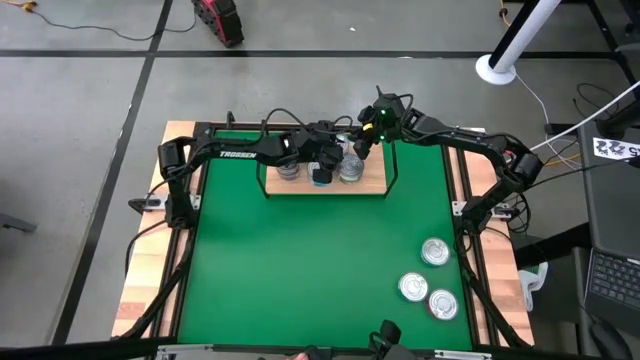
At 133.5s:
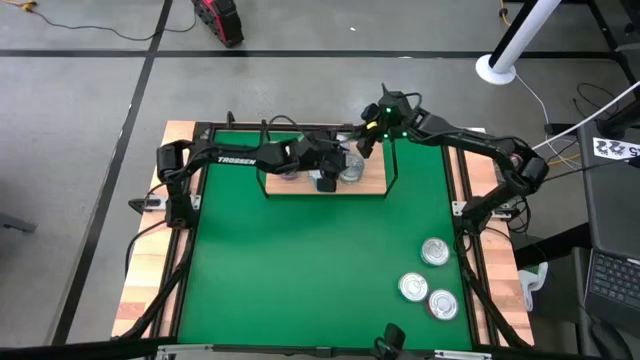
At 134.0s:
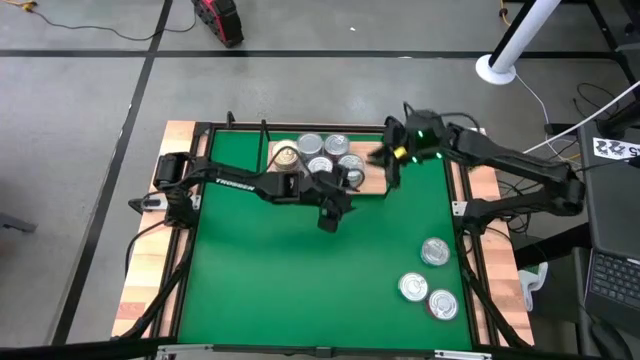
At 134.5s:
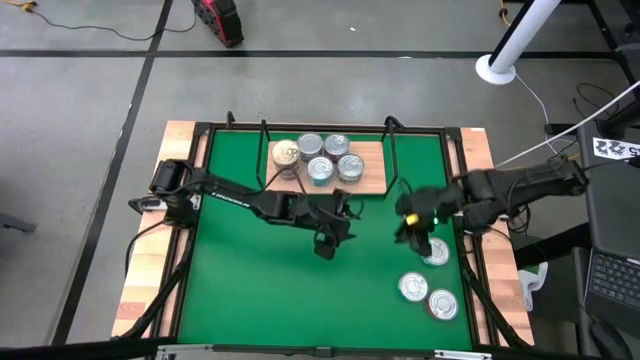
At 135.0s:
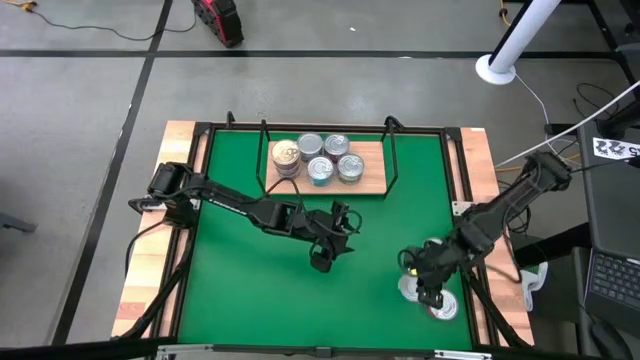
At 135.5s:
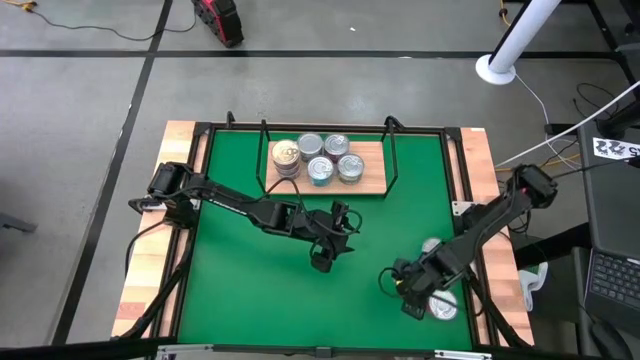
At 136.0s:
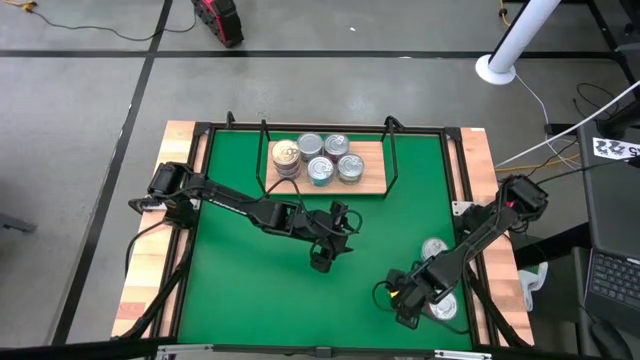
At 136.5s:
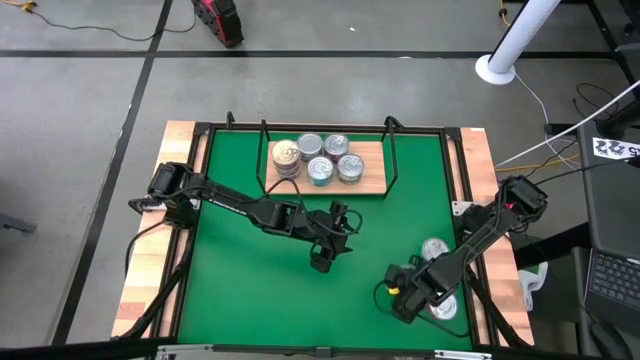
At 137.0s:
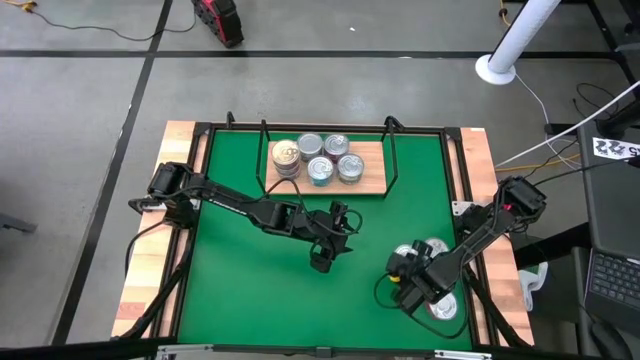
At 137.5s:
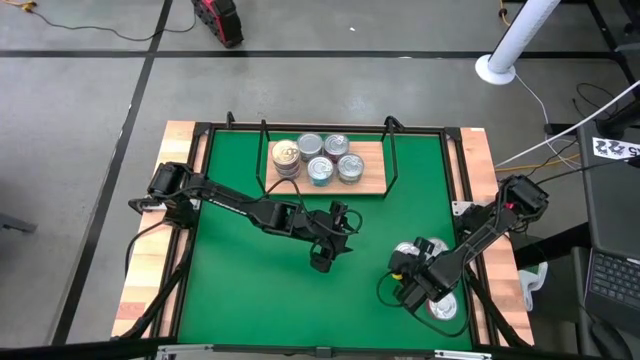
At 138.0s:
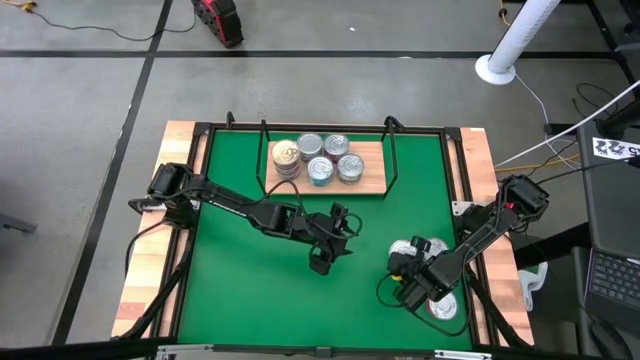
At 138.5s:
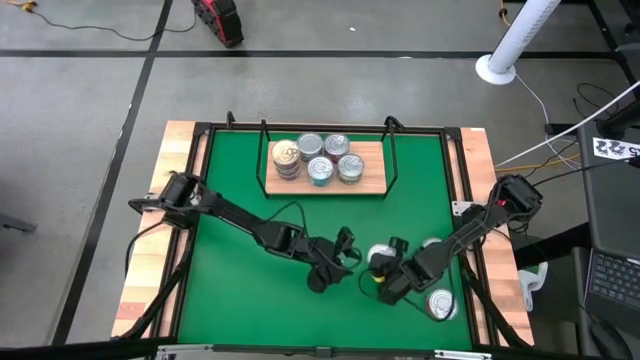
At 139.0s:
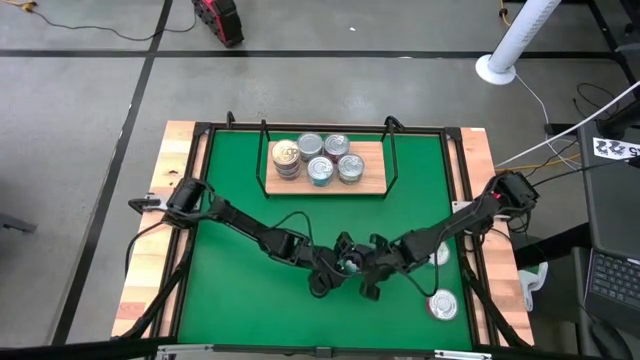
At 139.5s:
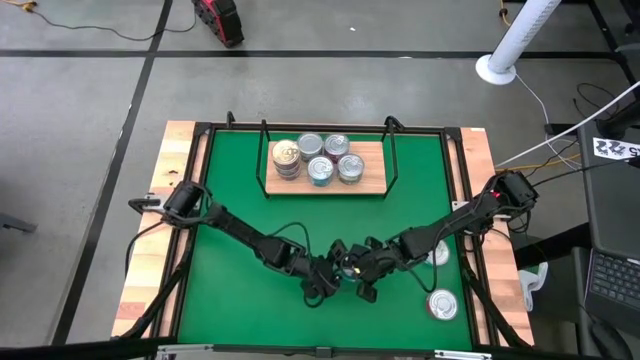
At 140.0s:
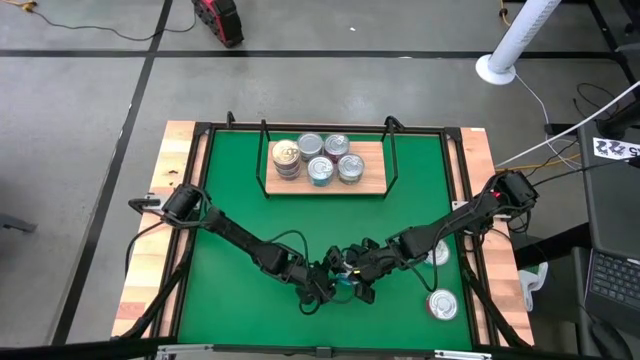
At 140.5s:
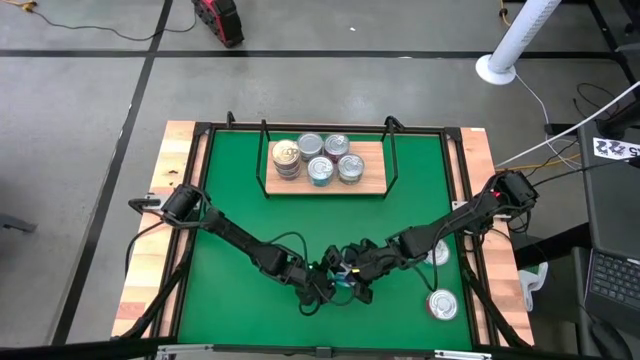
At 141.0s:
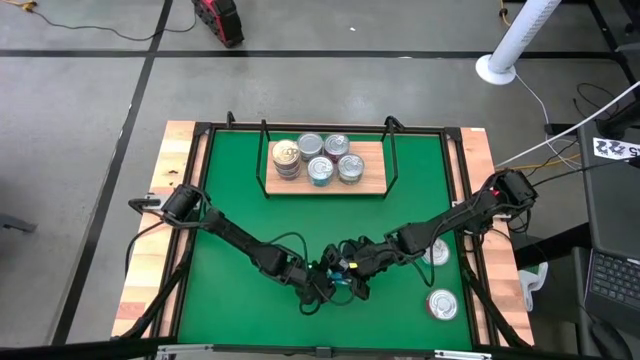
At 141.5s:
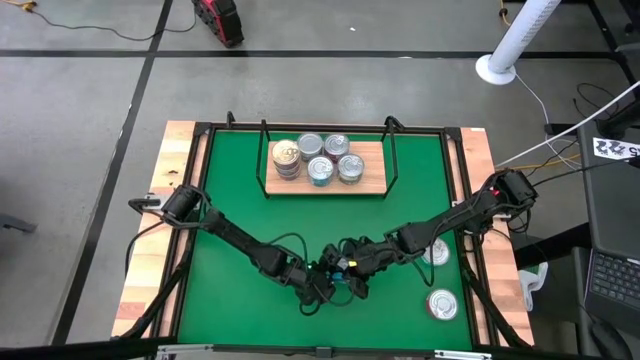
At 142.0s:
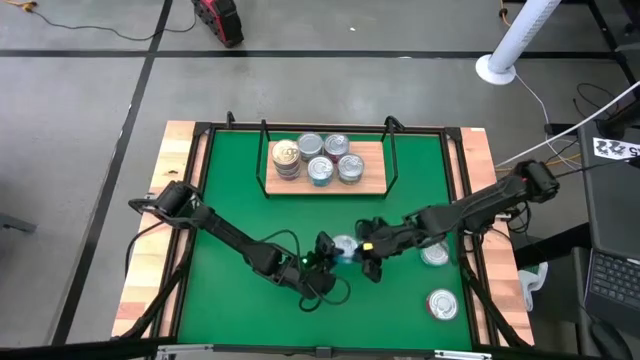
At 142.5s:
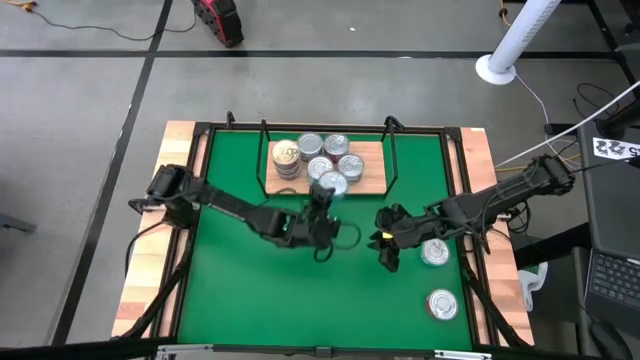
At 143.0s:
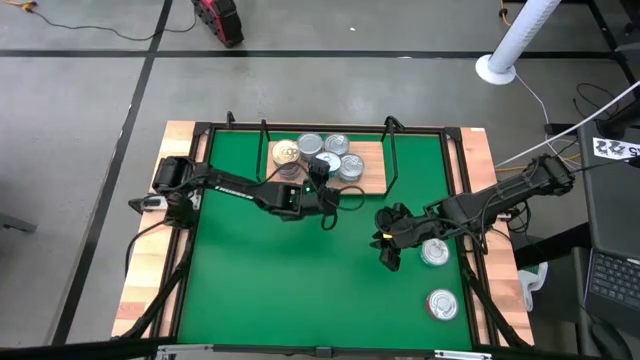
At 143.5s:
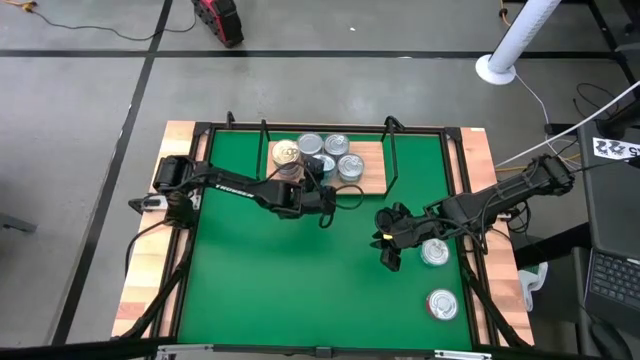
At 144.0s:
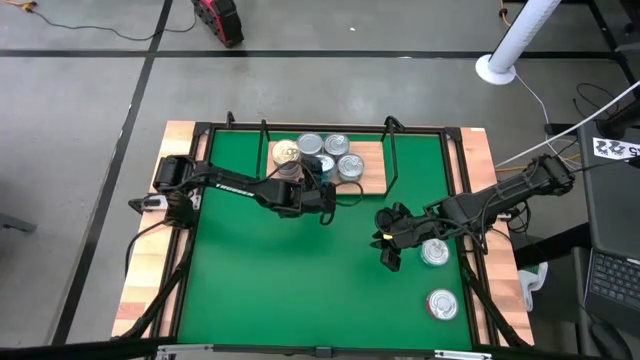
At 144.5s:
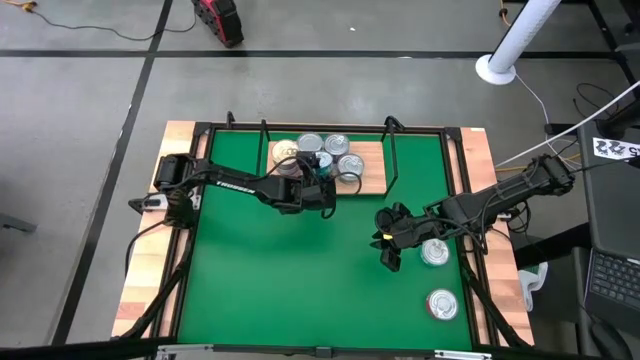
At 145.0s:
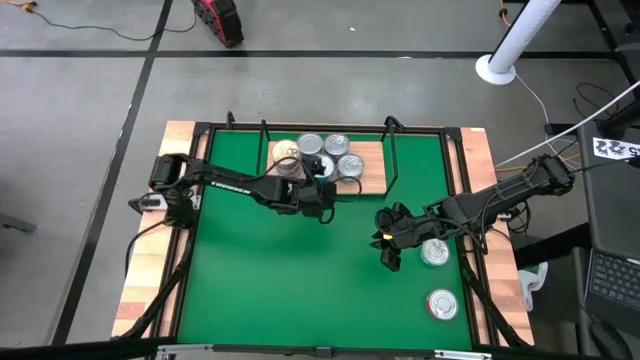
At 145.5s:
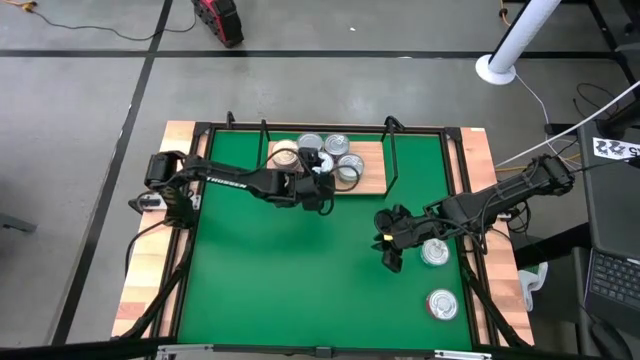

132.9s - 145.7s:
Task: Stack canned seafood by type on shelf
Stack the yellow blue tuna can on top of the other yellow blue tuna cans on the shelf

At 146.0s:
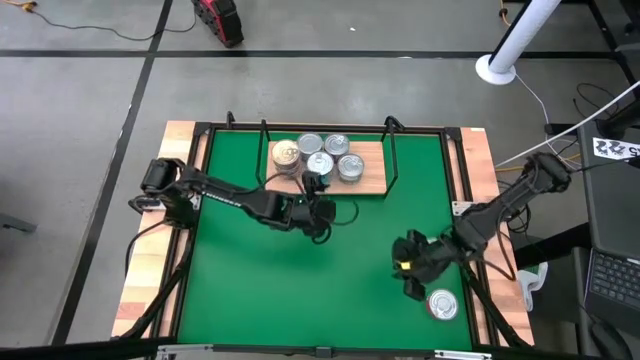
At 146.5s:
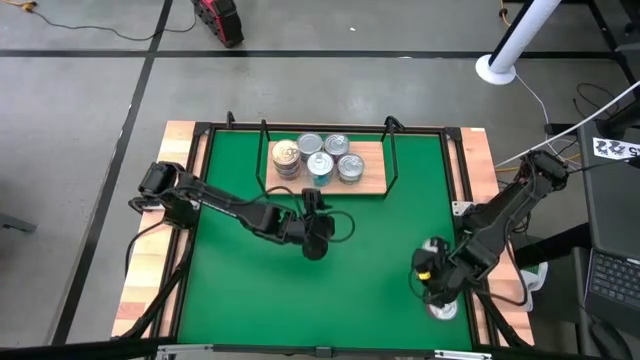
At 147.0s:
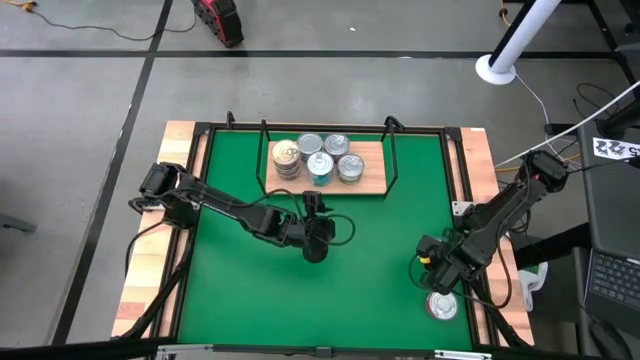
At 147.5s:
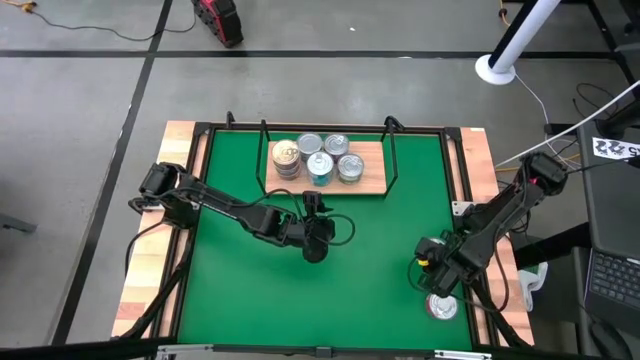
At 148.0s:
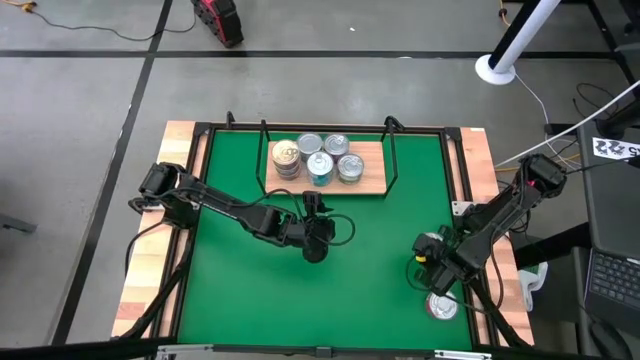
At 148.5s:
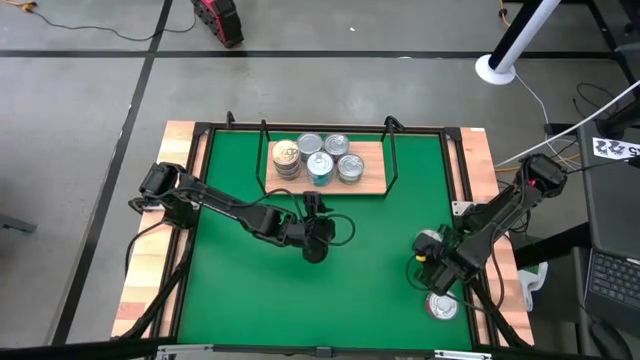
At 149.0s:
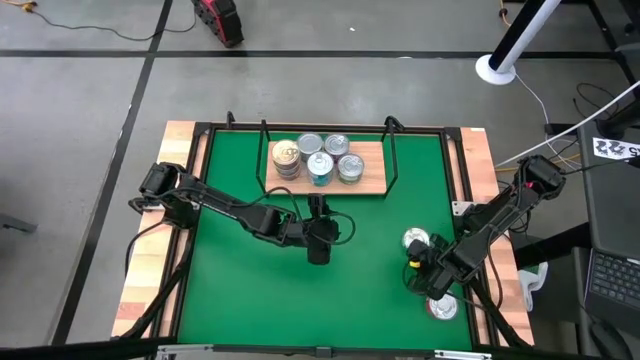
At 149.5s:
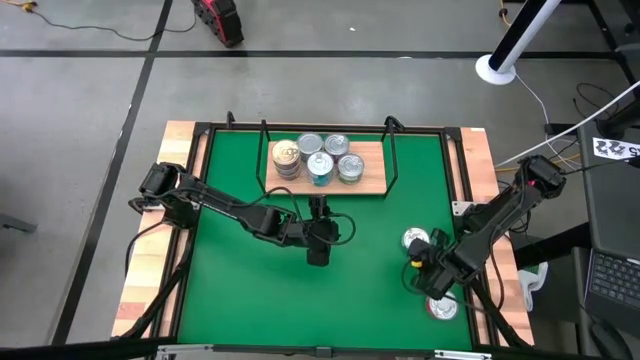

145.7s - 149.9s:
Stack the yellow blue tuna can on top of the other yellow blue tuna cans on the shelf

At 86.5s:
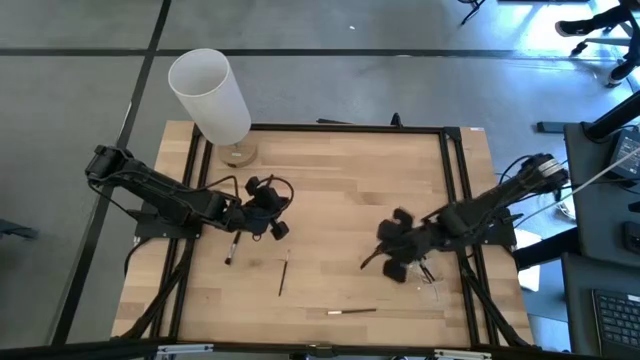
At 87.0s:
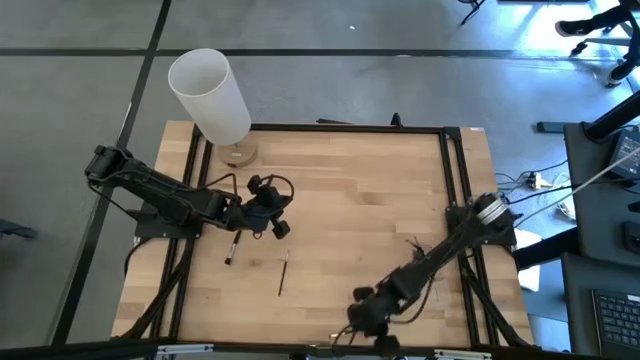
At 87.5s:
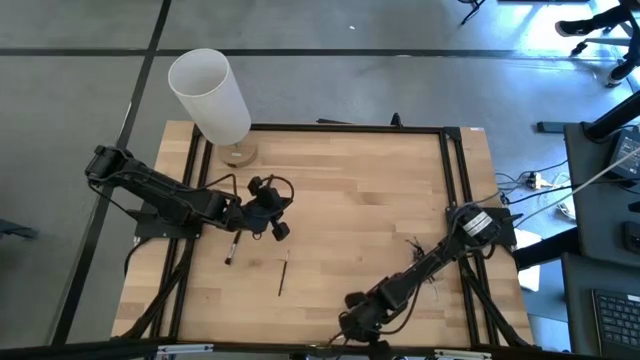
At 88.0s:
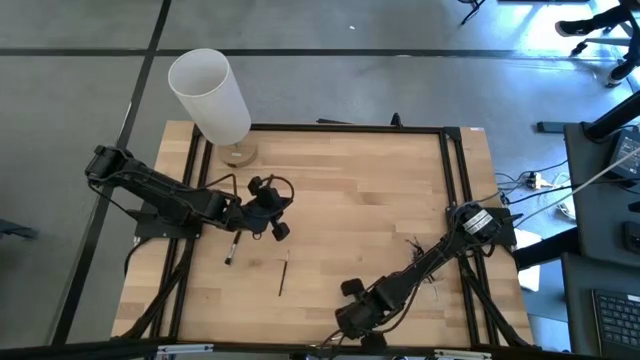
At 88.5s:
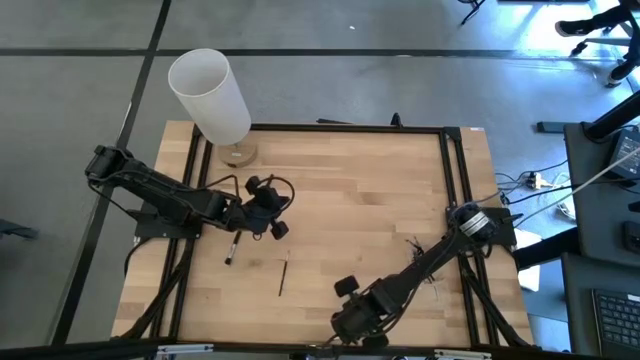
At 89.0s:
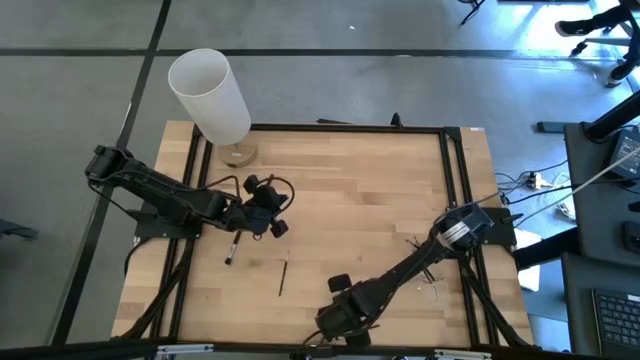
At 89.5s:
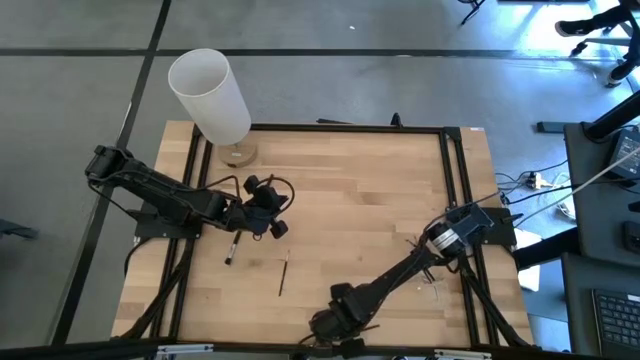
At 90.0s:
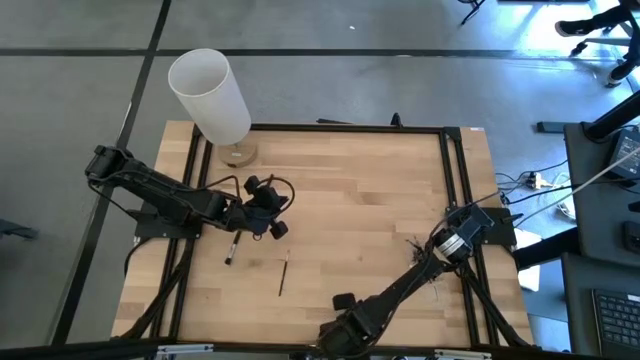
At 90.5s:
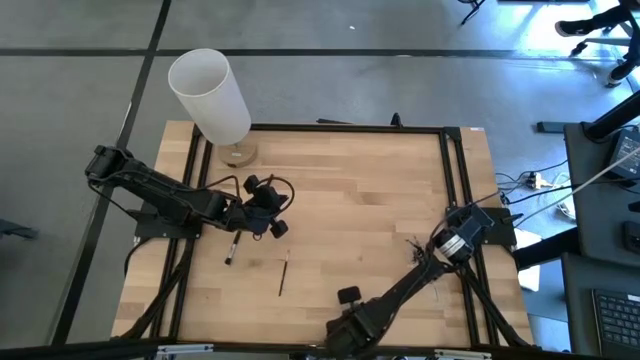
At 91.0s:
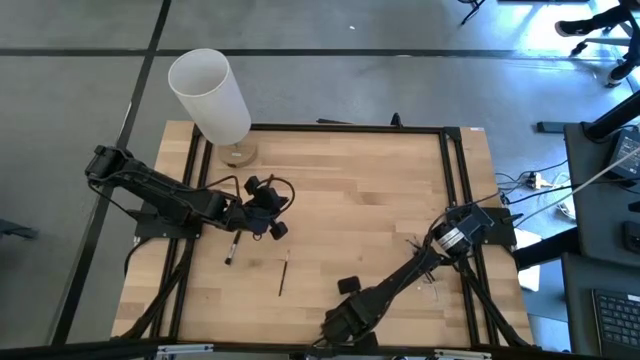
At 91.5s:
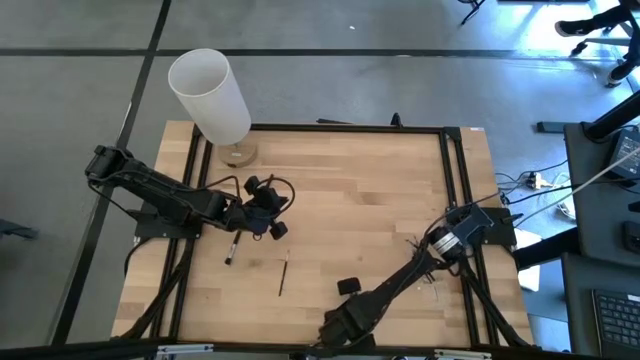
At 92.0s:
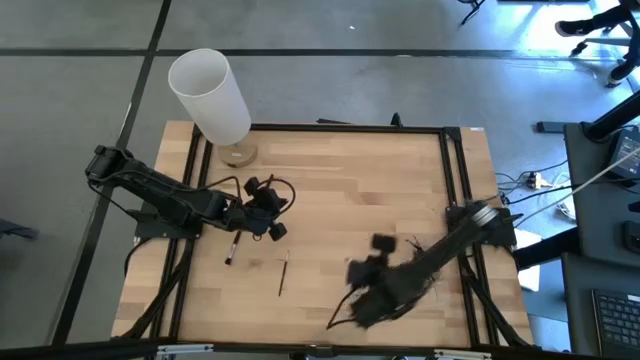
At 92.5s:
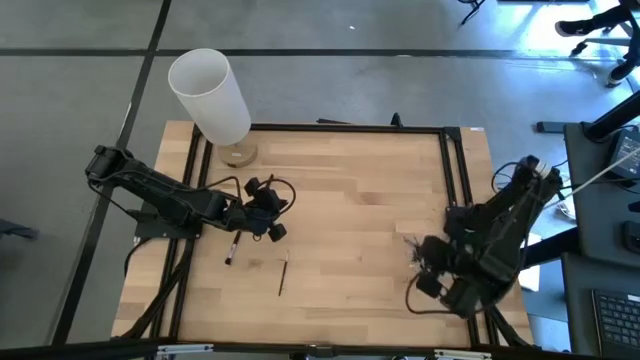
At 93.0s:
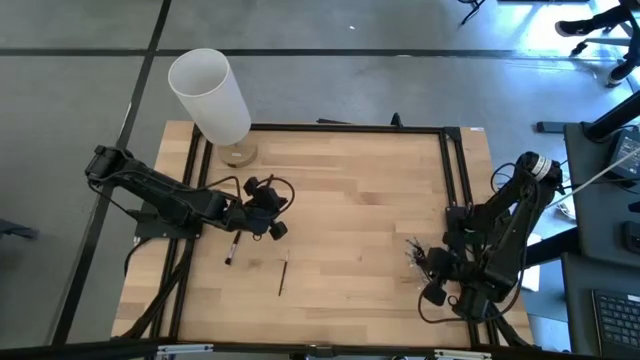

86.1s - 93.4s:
Task: Put items in baskets/containers
Put the black eyeshadow brush into the transparent organizer
